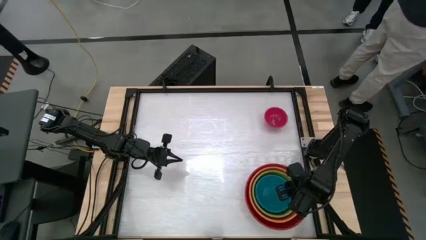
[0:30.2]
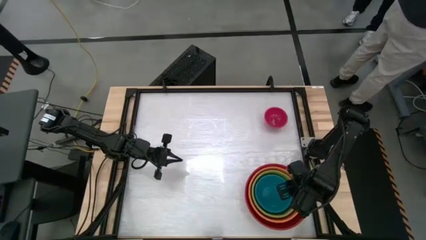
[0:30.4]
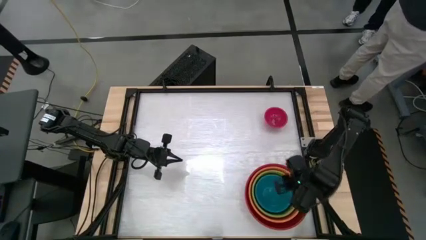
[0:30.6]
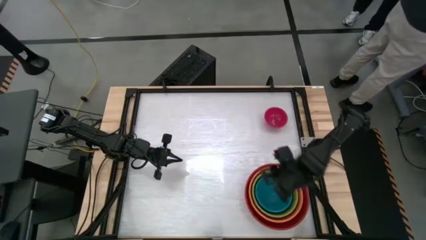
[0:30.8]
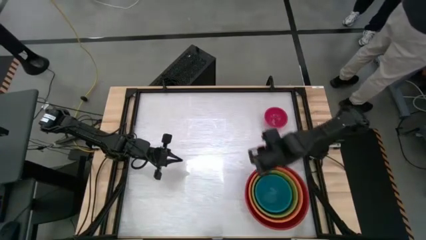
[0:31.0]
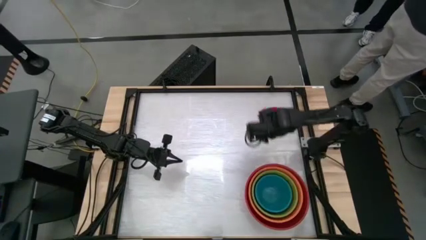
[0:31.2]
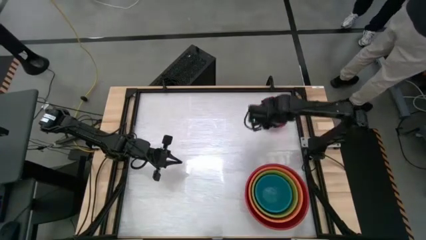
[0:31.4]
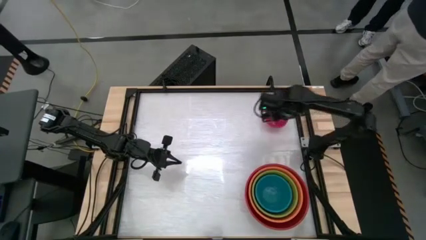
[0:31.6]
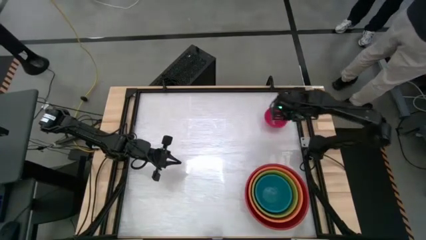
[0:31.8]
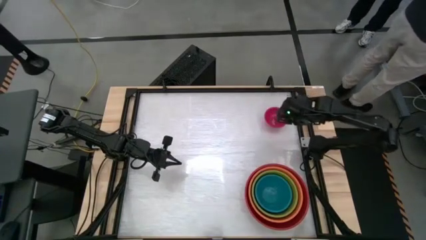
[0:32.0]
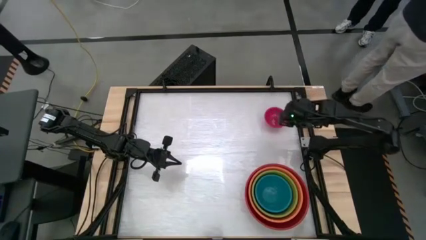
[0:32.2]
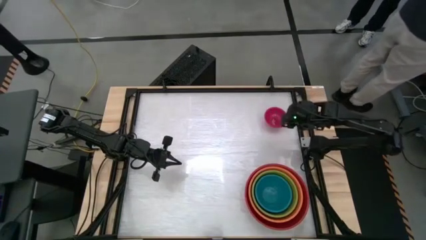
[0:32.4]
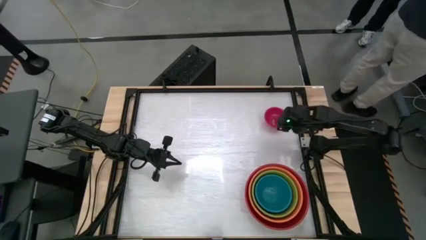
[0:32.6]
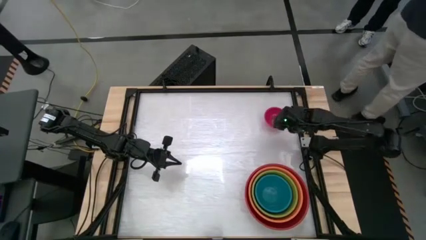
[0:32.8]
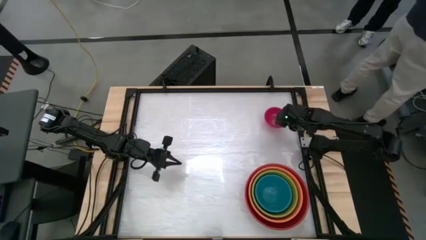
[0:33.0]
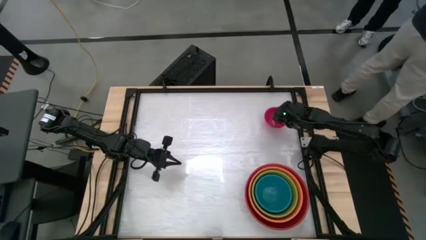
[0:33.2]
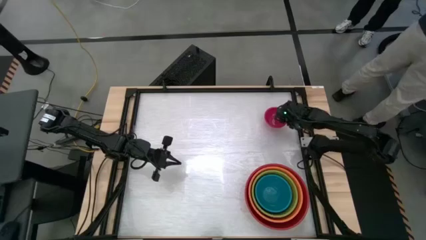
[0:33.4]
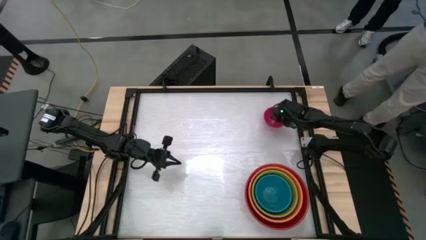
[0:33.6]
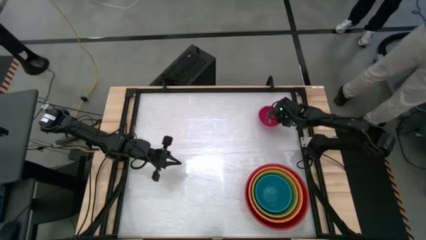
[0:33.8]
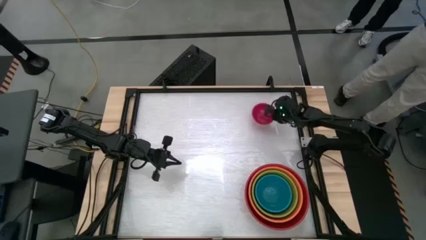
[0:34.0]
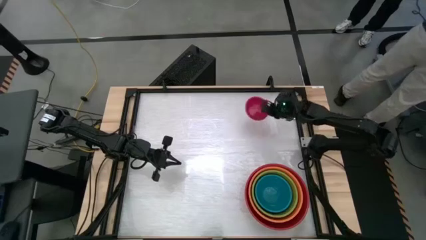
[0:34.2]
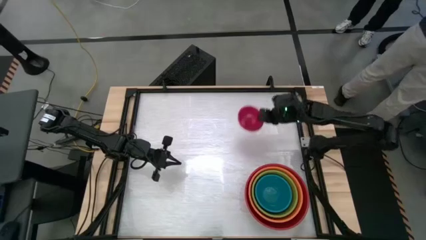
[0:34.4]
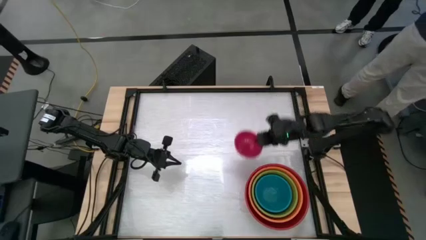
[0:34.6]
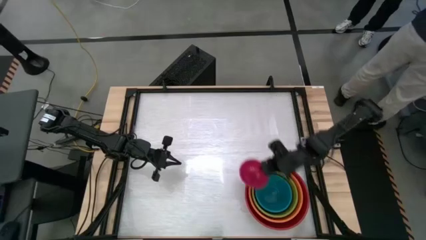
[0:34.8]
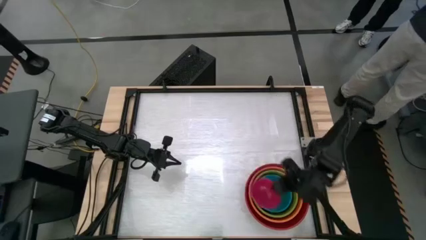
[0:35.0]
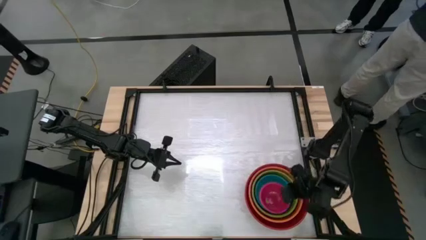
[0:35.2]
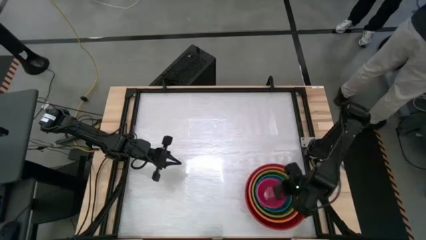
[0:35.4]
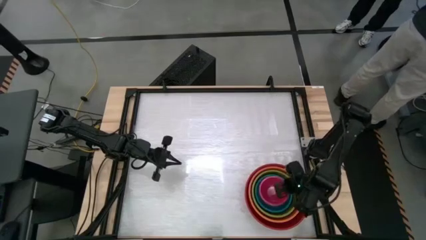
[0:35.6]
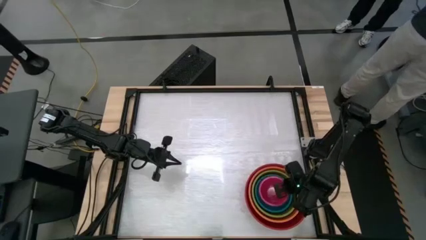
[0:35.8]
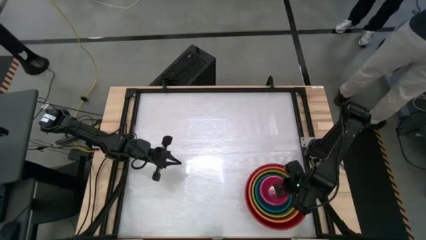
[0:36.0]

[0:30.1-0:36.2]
Stack the pink bowl on top of the blue bowl

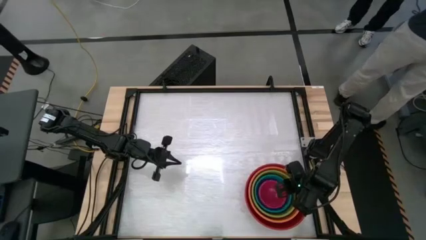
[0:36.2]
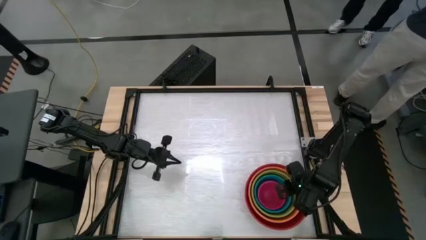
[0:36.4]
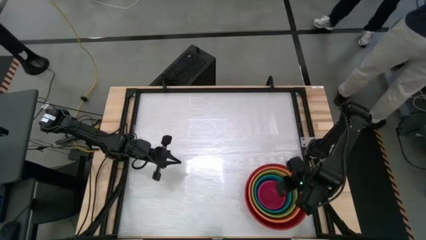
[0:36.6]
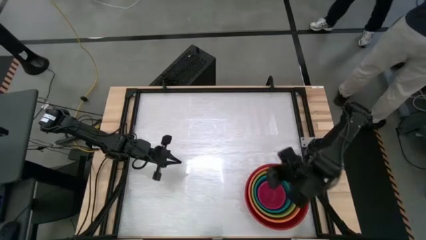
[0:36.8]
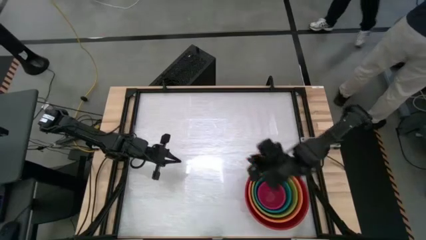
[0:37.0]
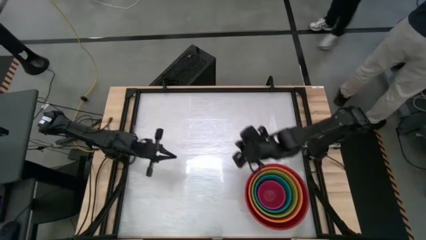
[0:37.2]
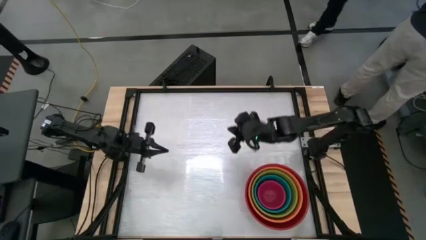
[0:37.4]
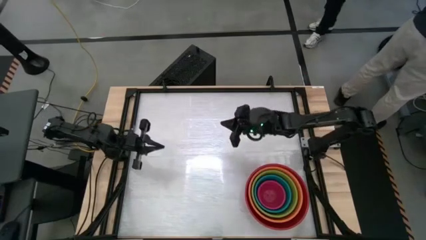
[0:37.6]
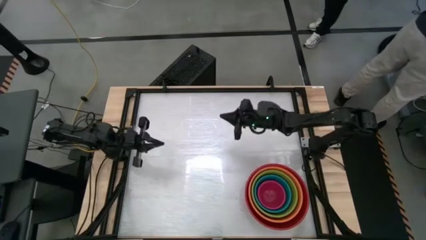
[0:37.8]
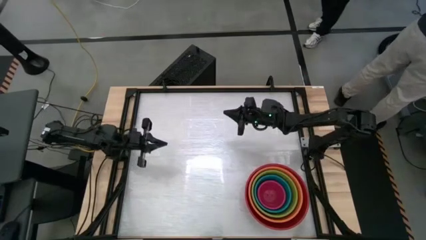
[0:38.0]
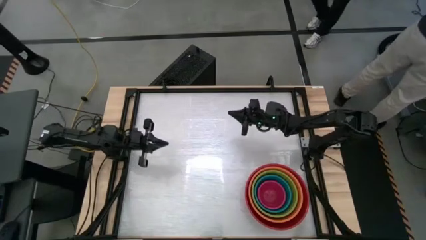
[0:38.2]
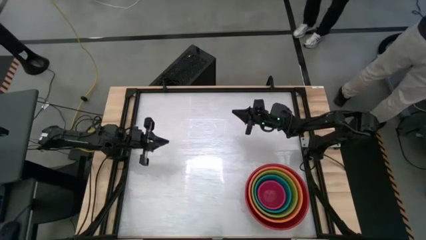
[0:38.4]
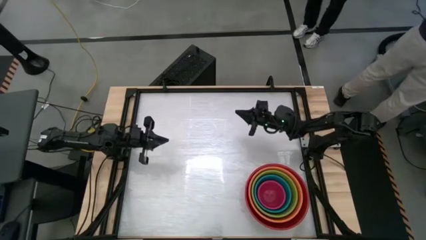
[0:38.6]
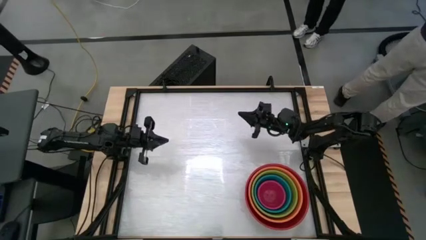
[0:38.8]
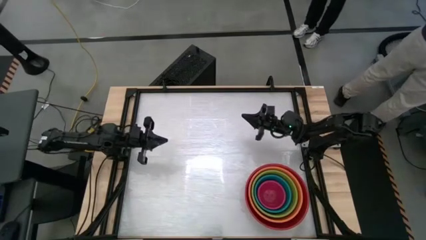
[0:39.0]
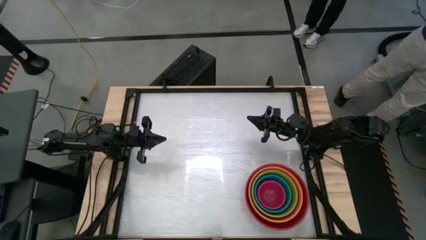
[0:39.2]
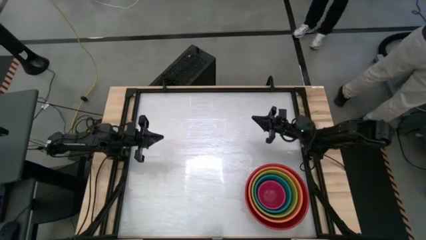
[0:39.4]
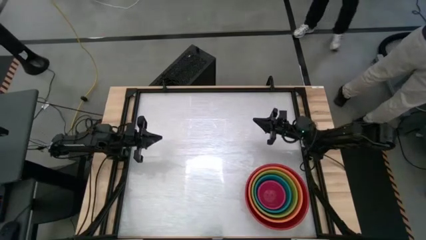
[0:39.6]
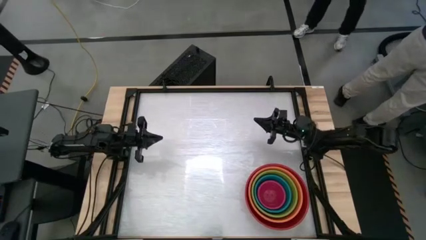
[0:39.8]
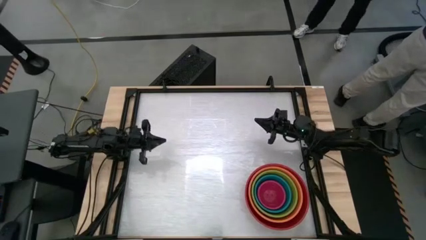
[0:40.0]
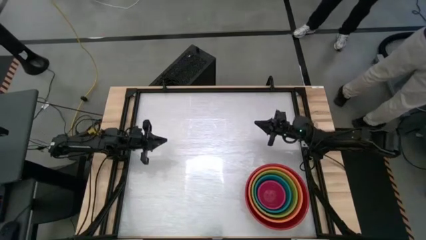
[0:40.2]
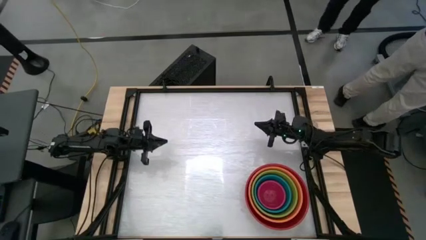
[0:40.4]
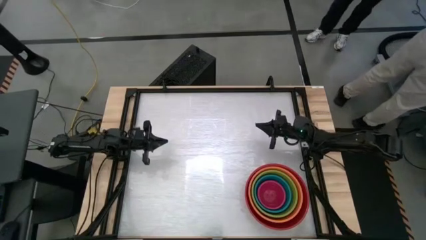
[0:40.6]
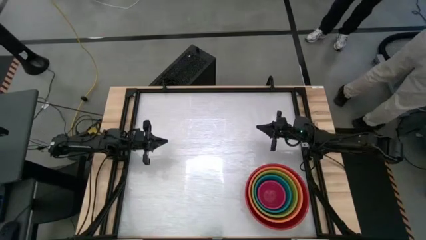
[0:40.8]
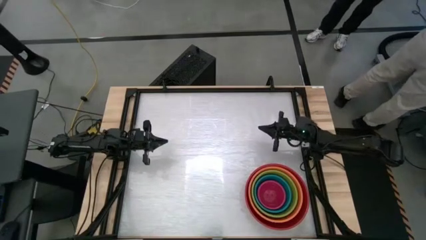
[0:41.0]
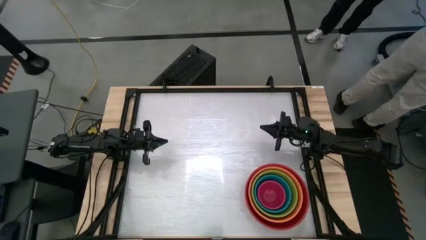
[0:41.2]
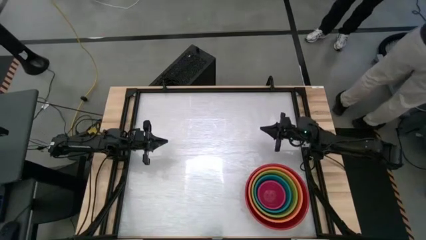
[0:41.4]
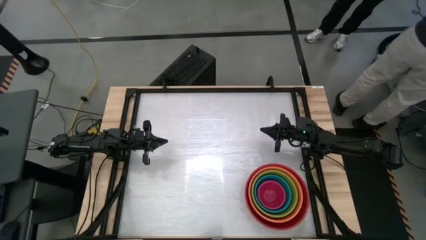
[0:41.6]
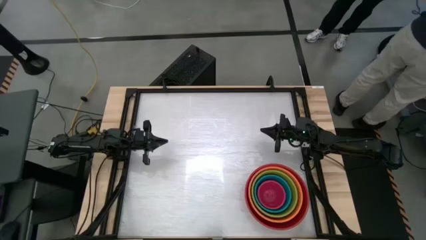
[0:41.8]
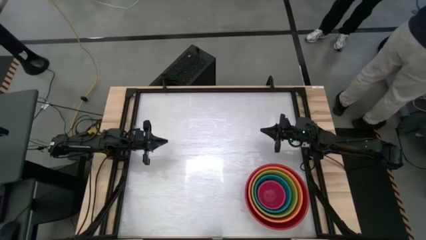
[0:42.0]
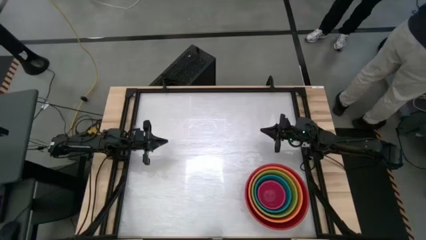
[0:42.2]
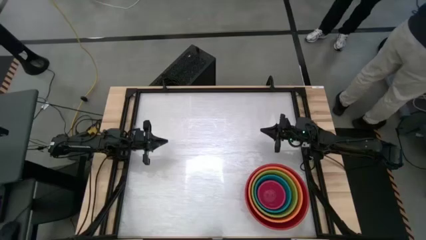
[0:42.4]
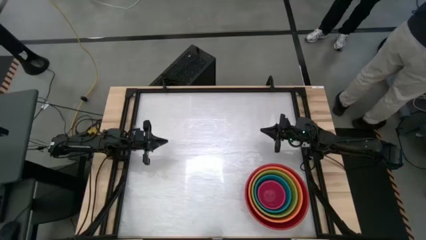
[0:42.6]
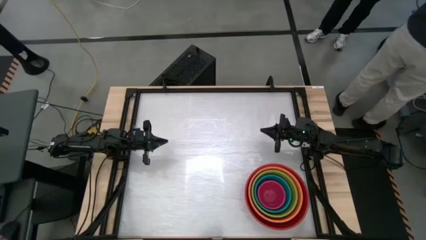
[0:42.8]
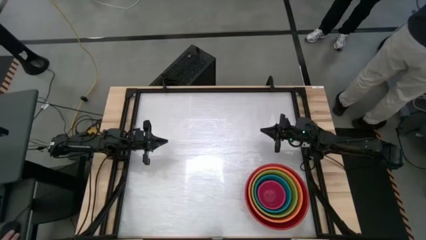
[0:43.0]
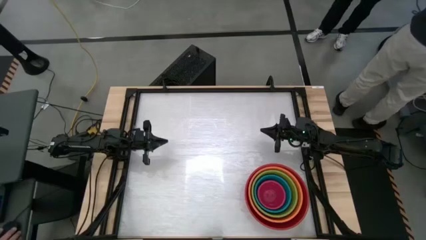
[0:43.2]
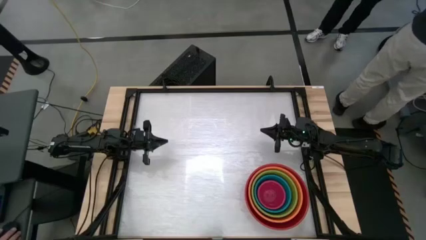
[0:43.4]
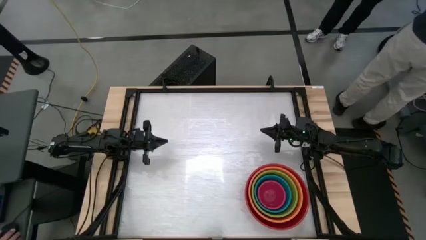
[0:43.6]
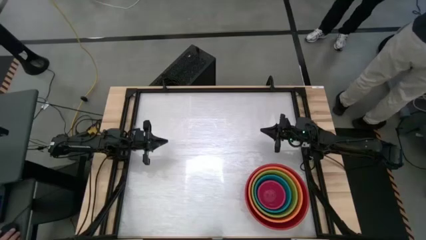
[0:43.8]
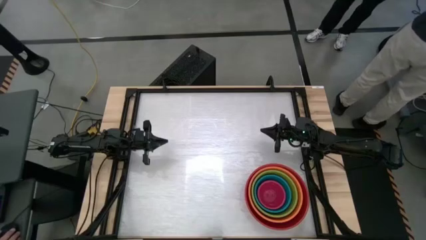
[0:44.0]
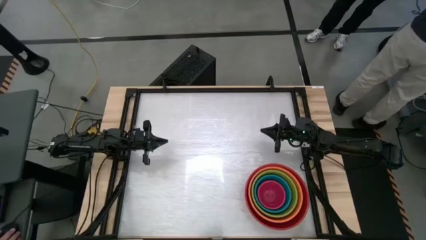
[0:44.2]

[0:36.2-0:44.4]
Return to Home Position

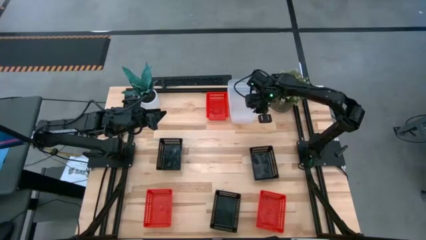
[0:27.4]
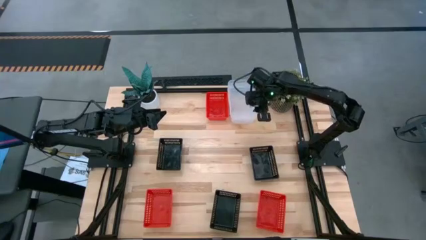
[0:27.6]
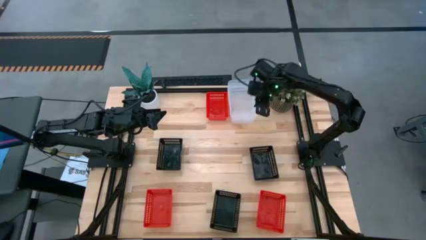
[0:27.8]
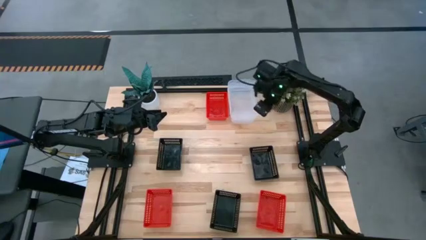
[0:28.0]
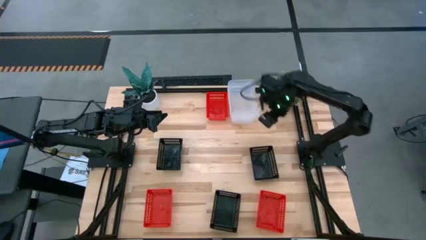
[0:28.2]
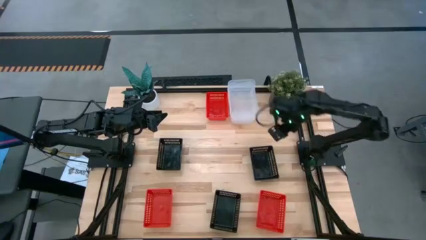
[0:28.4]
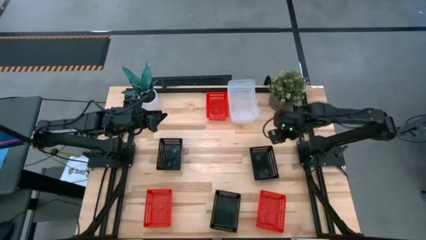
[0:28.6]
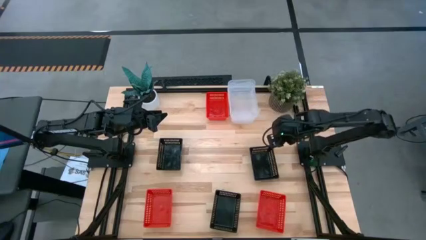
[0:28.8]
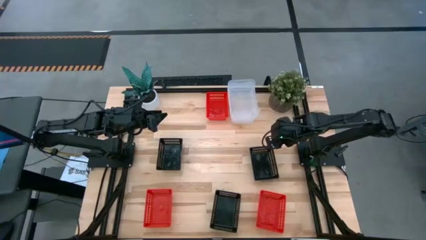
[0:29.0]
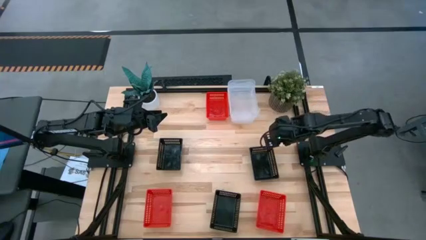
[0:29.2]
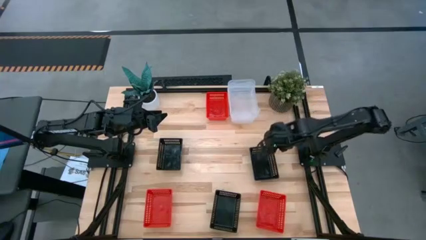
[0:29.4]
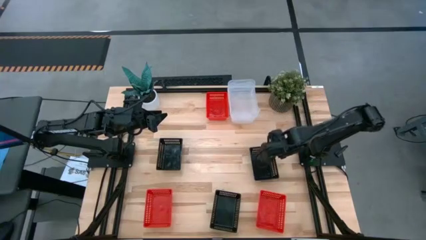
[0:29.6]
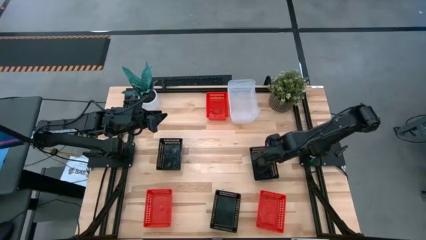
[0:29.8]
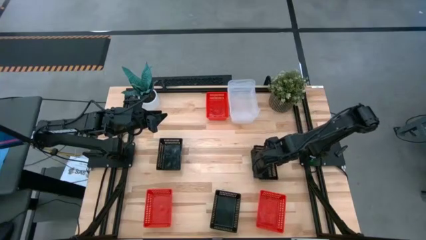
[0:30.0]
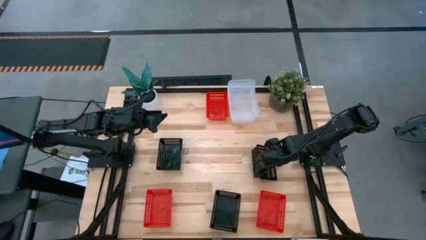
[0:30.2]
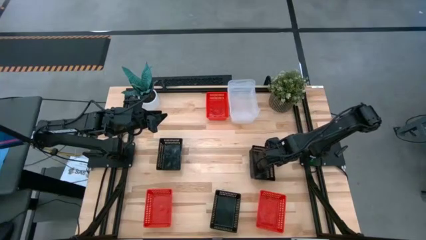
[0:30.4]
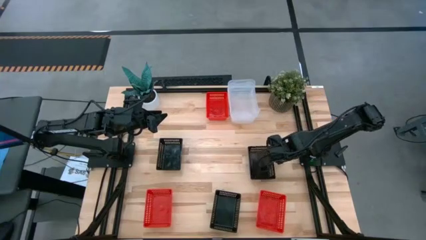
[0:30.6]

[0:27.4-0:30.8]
Adjust the right black bin
